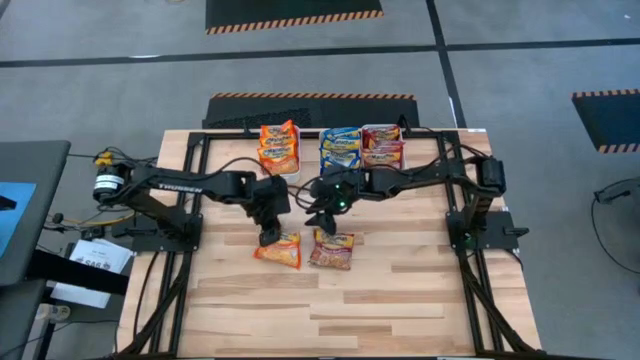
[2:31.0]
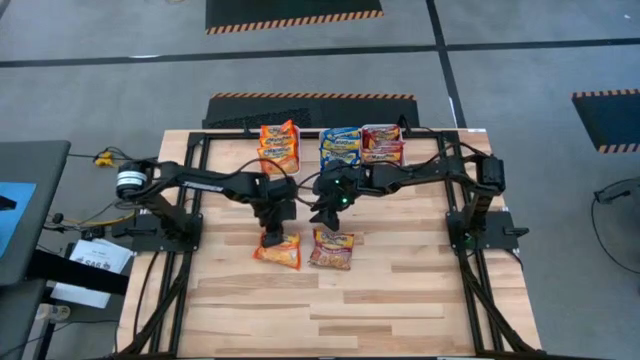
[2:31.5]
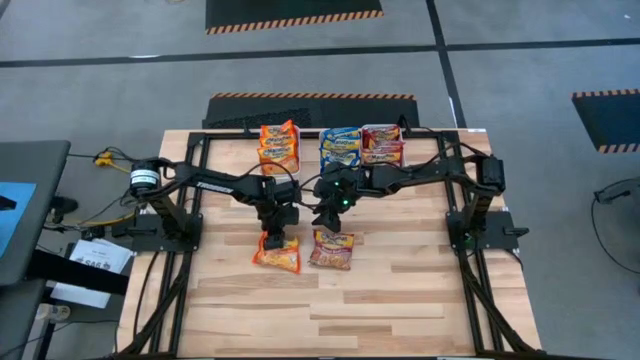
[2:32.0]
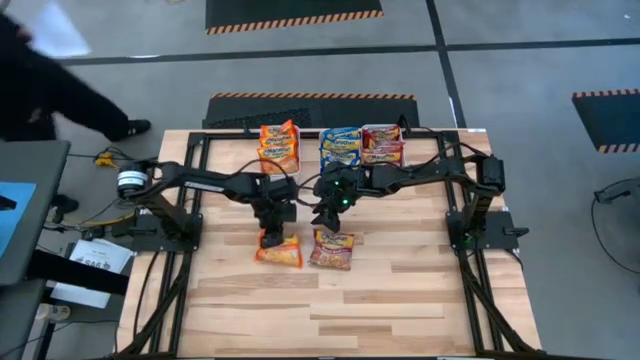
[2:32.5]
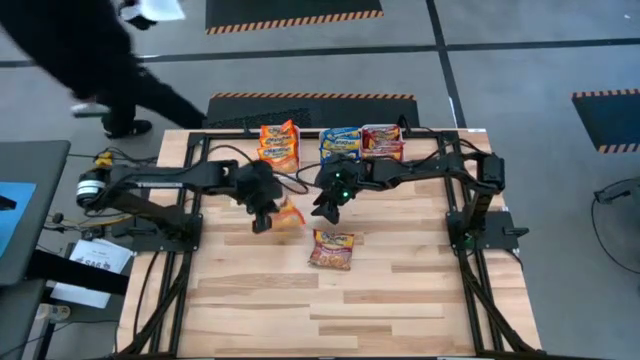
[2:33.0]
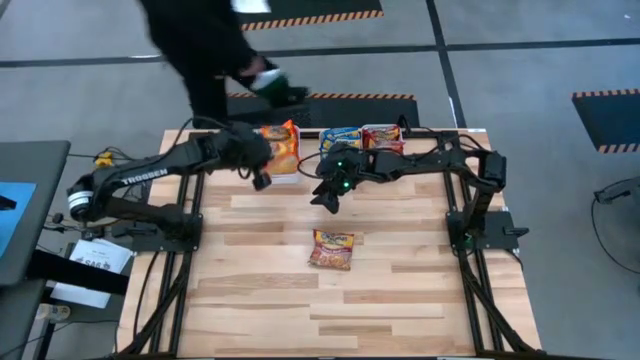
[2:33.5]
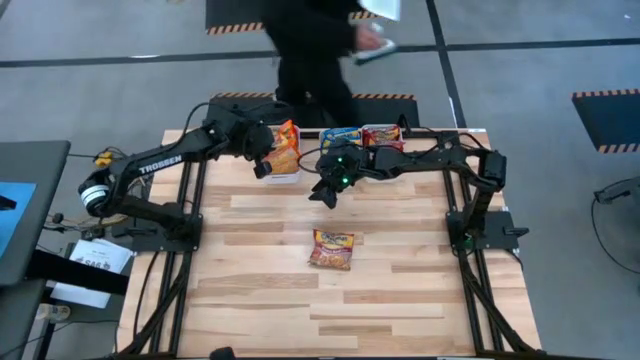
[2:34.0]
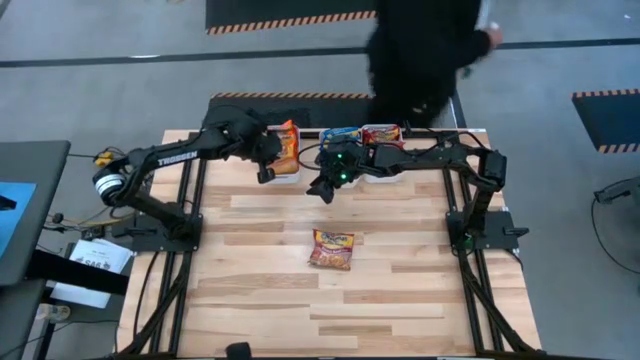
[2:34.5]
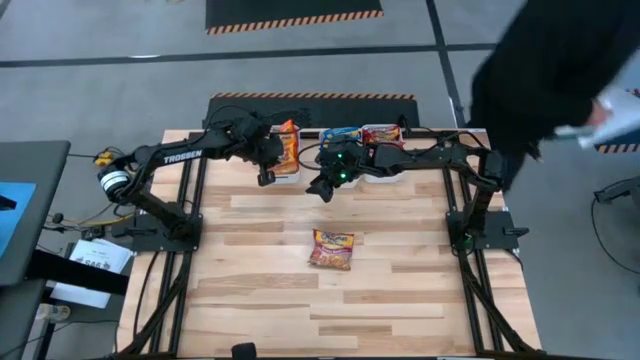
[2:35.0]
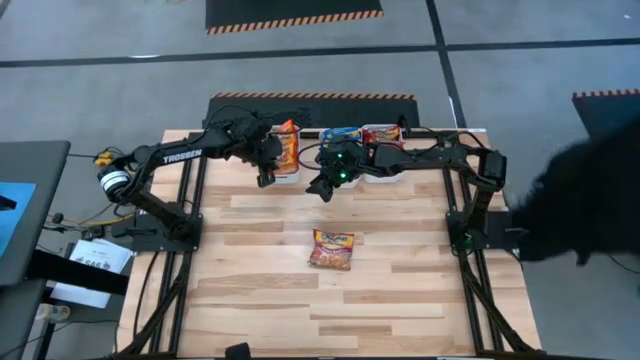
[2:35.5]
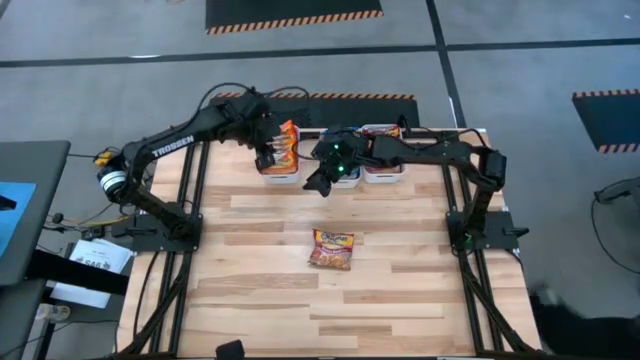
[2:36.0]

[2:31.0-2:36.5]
Task: Sort Maruchan noodles
Put the orange noodle soup pack into the left white bin

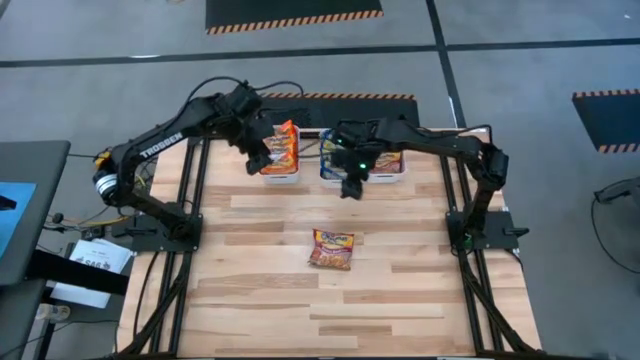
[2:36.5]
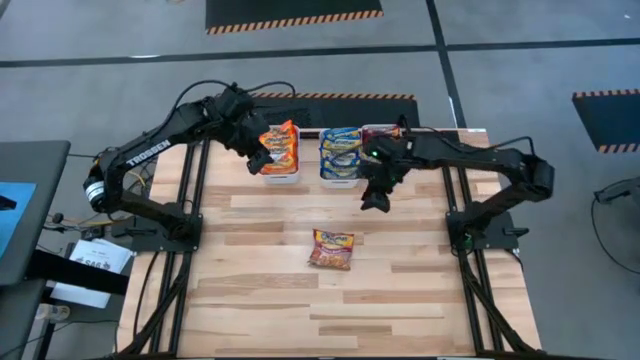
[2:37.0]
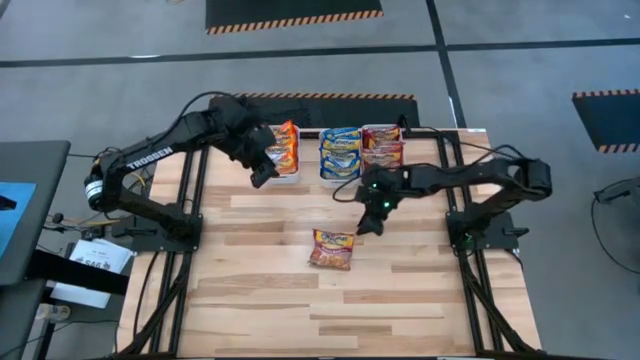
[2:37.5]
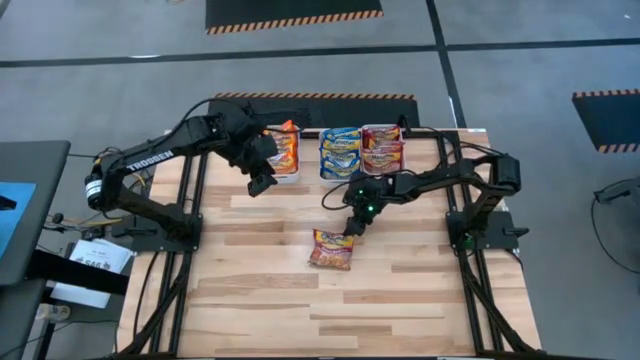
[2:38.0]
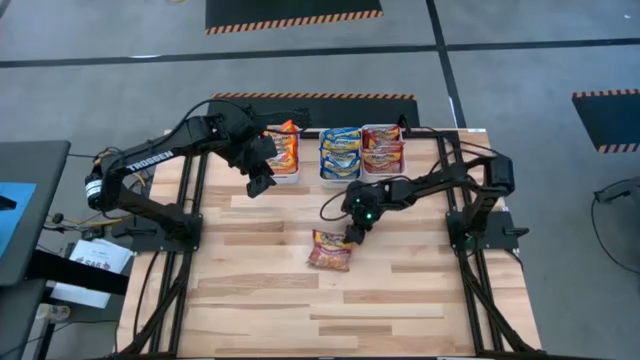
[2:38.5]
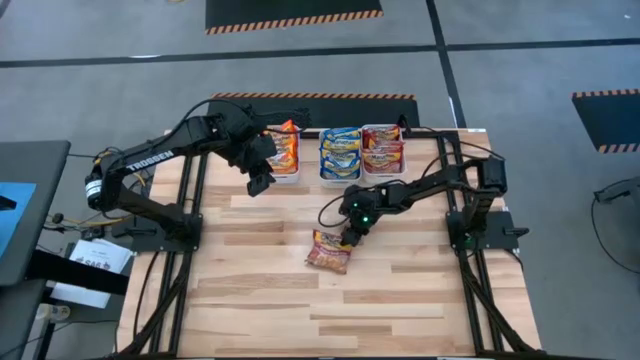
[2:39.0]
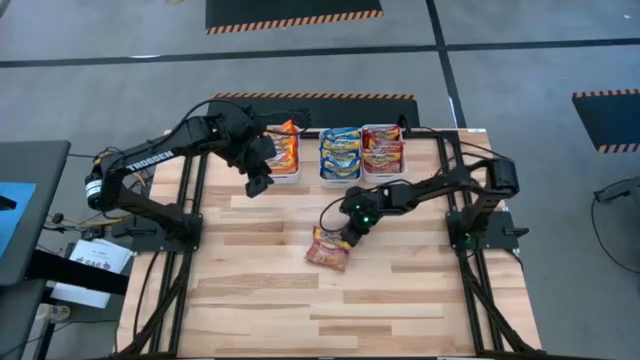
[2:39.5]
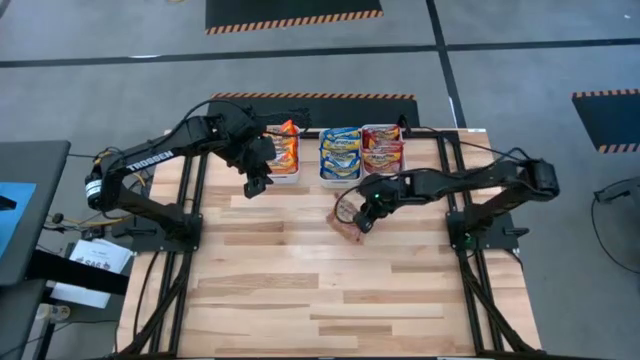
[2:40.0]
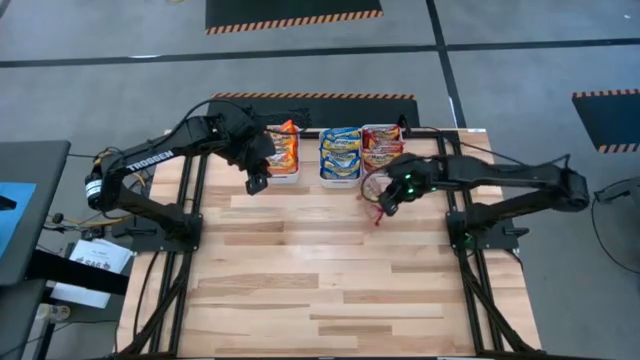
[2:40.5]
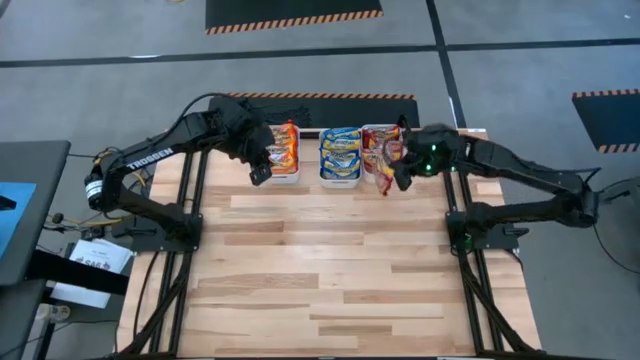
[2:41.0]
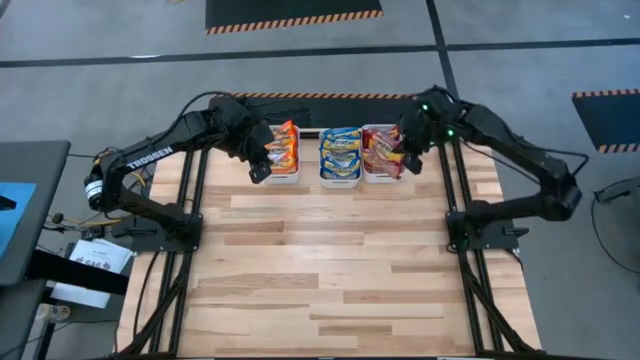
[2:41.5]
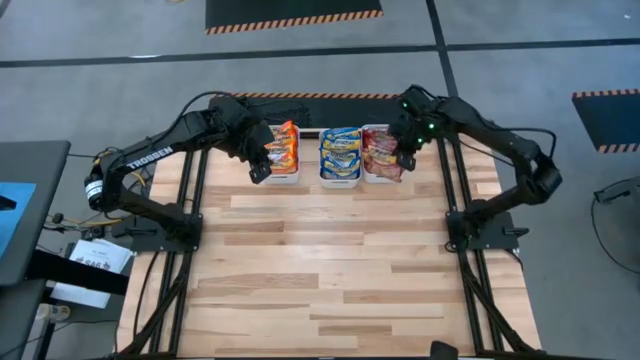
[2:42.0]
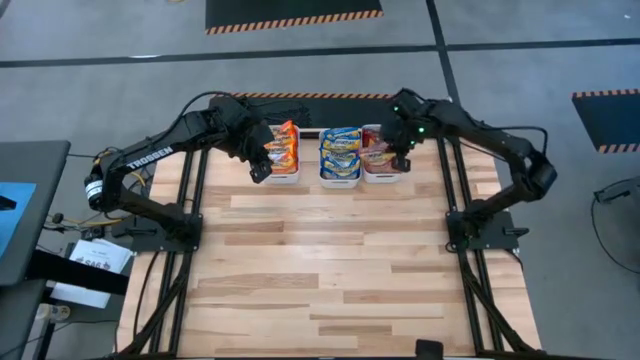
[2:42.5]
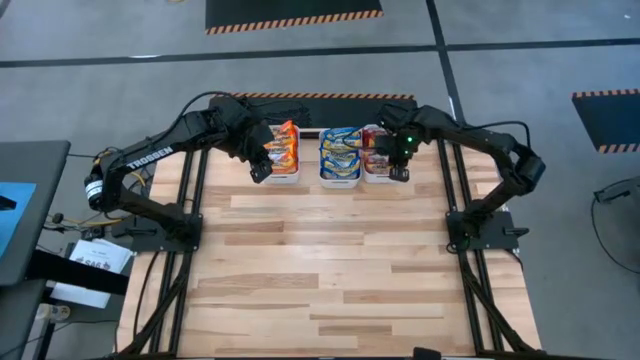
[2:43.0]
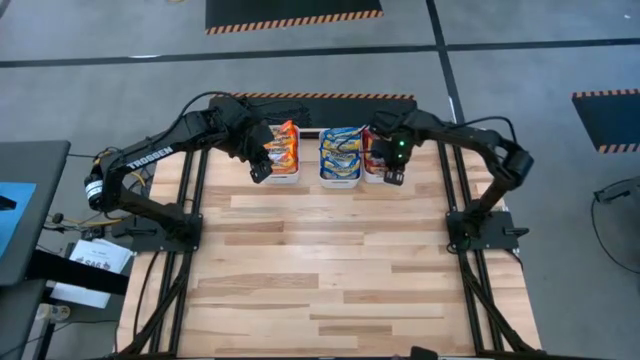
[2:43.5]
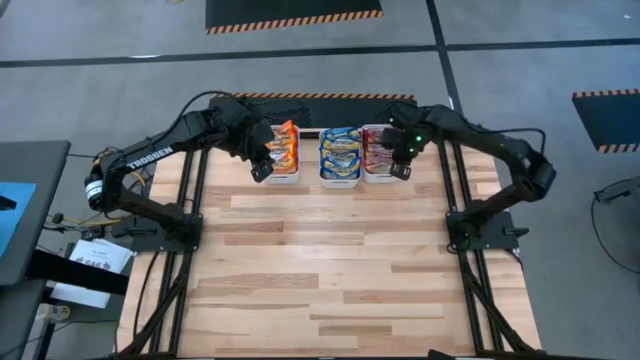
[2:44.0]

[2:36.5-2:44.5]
Put the red noodle soup pack into the right white bin

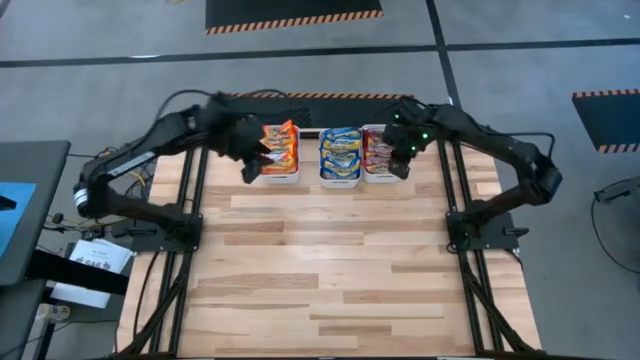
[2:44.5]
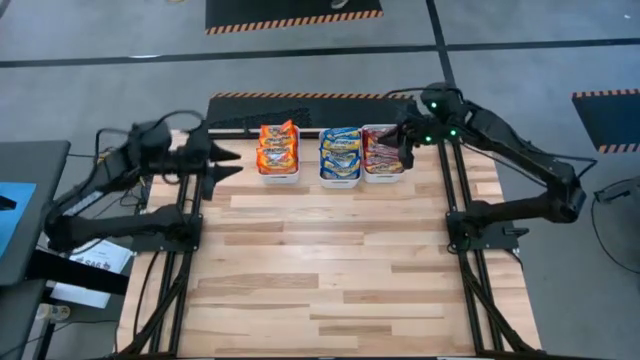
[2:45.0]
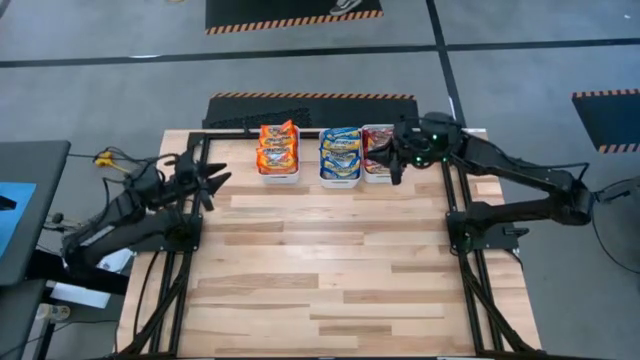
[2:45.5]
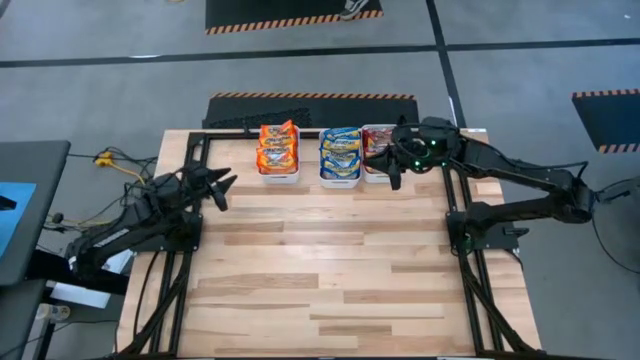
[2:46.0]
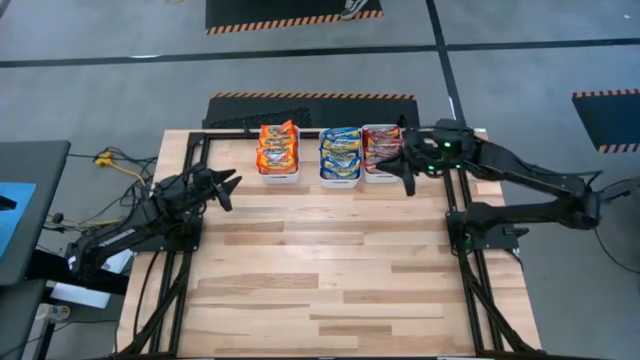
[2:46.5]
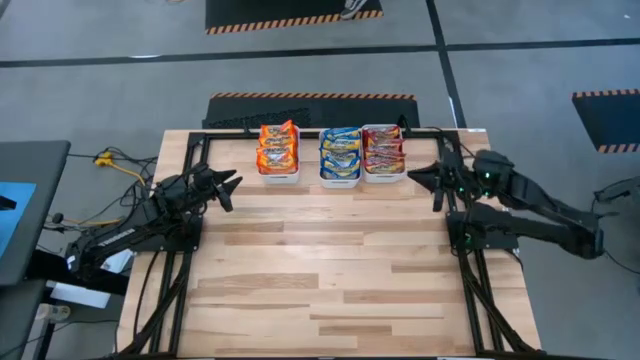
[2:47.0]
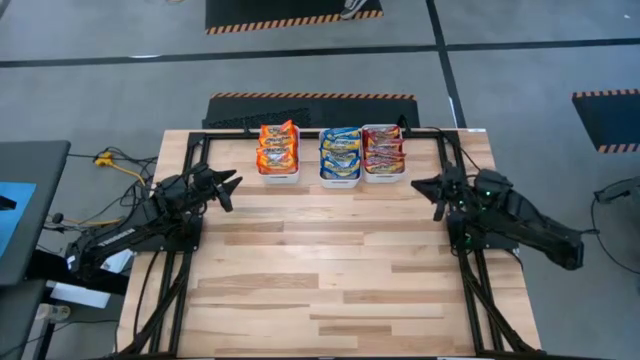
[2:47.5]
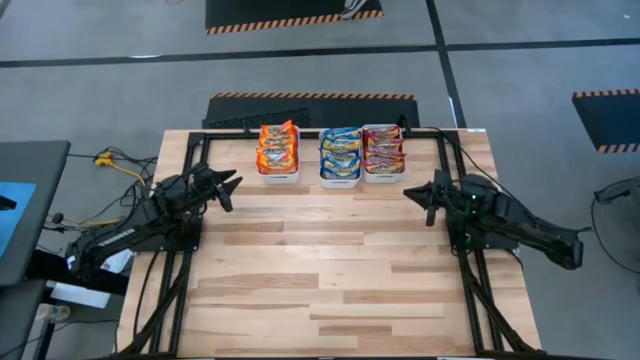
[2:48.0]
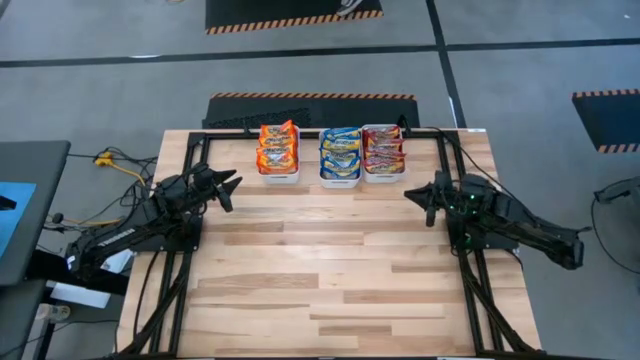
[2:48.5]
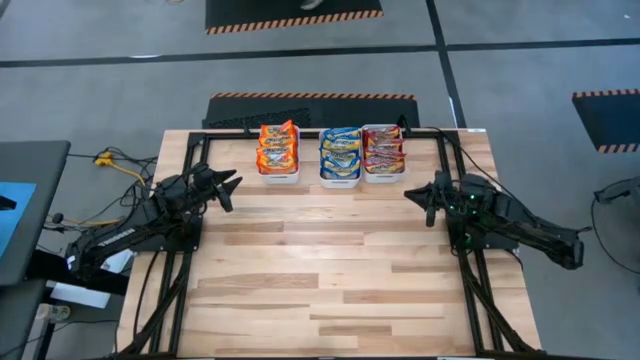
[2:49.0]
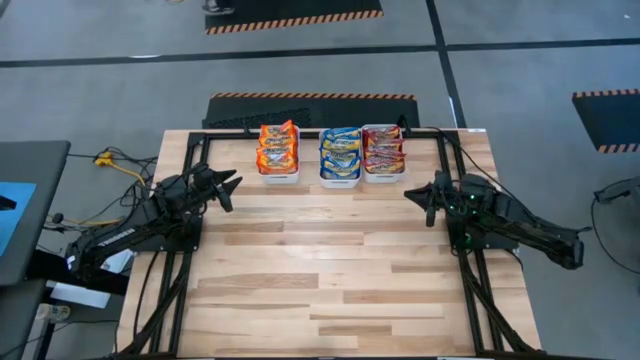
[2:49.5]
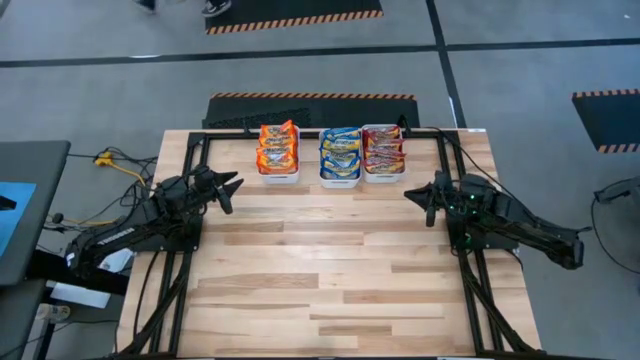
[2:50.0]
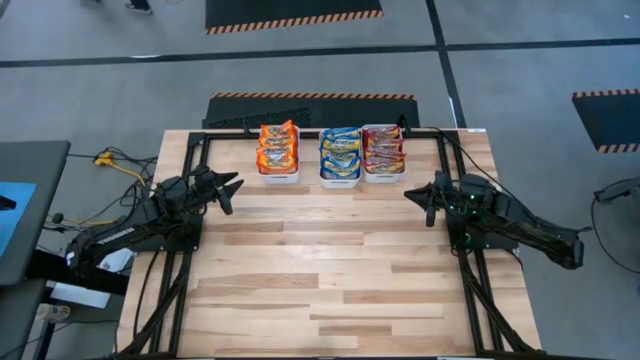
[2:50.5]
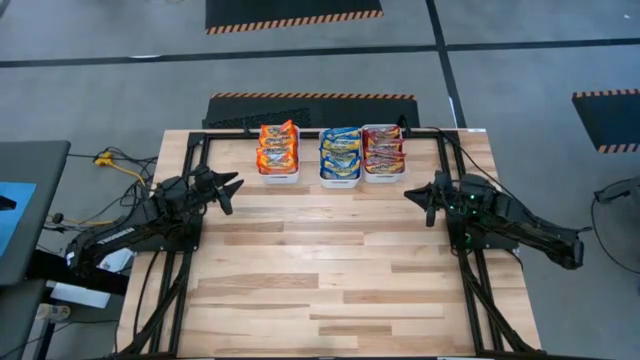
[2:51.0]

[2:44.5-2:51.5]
Return to Home Position
